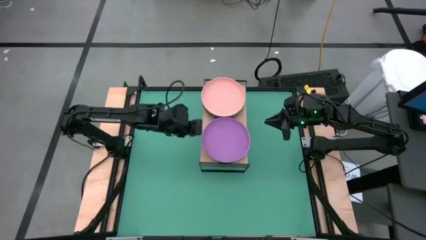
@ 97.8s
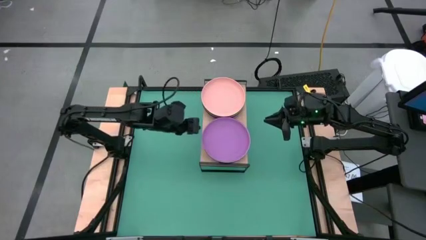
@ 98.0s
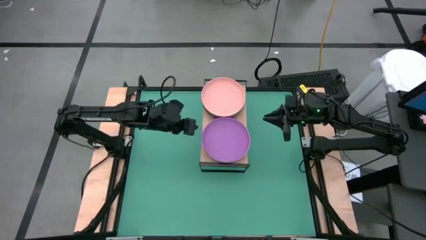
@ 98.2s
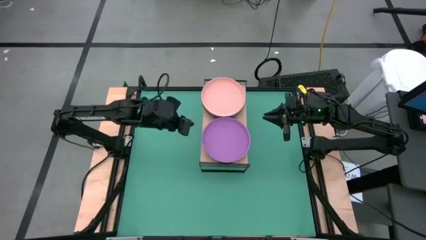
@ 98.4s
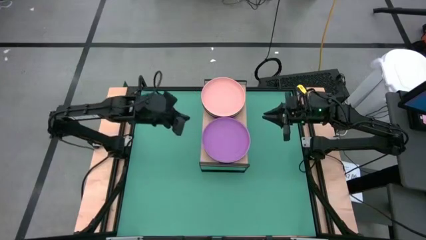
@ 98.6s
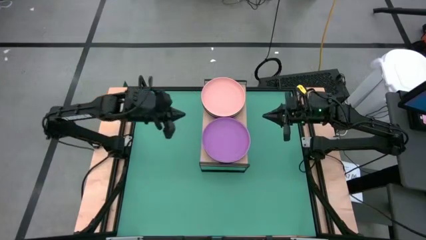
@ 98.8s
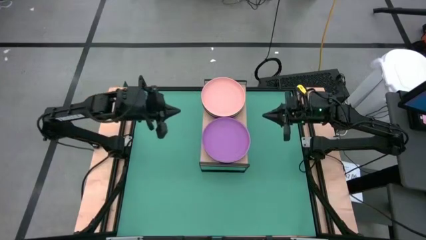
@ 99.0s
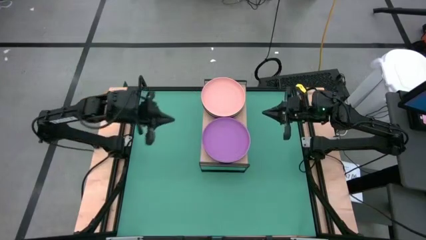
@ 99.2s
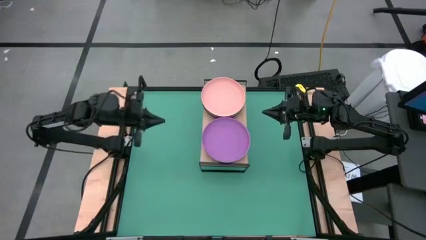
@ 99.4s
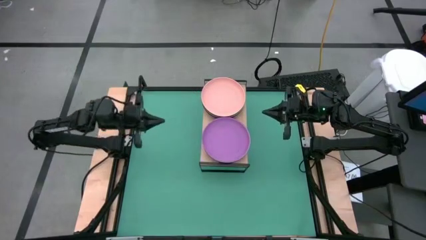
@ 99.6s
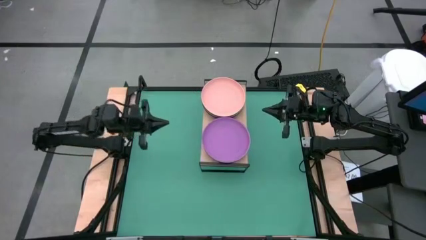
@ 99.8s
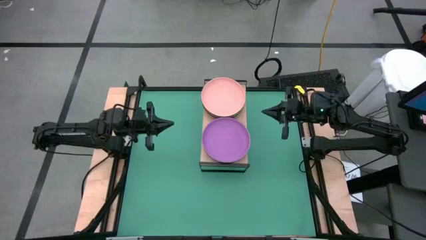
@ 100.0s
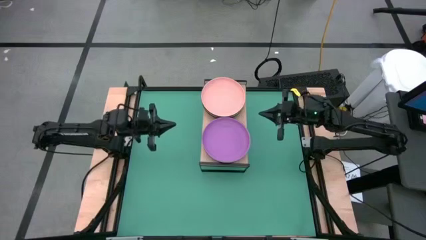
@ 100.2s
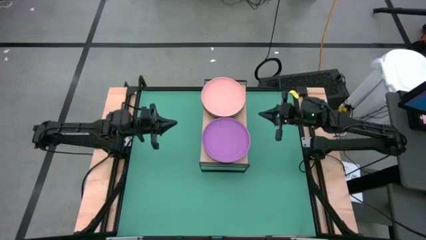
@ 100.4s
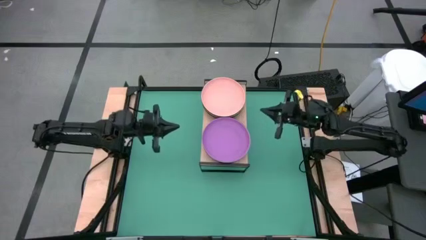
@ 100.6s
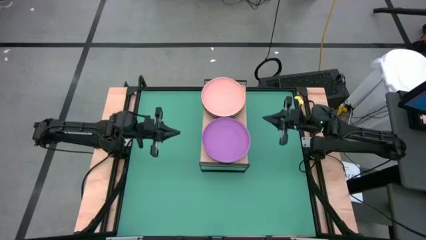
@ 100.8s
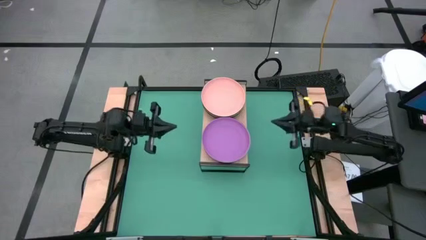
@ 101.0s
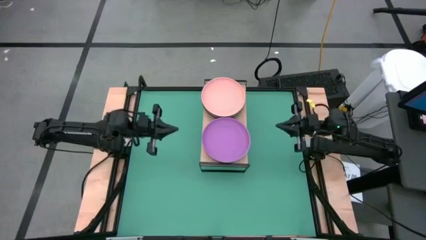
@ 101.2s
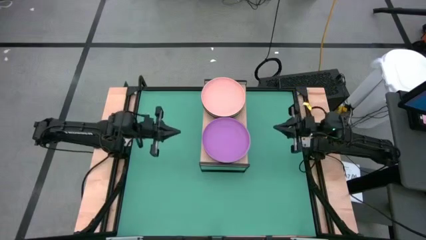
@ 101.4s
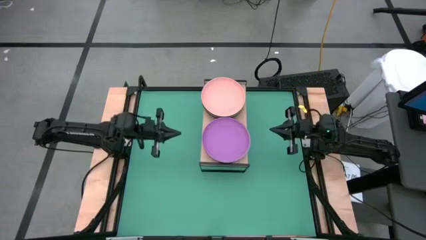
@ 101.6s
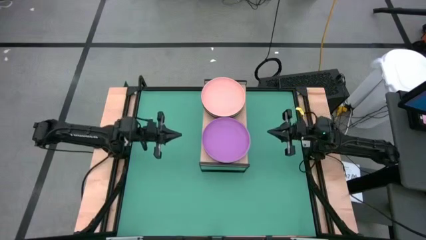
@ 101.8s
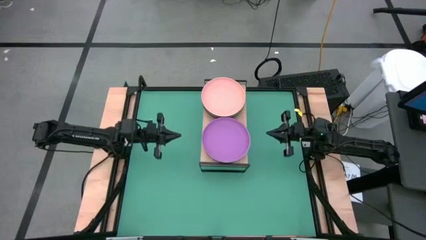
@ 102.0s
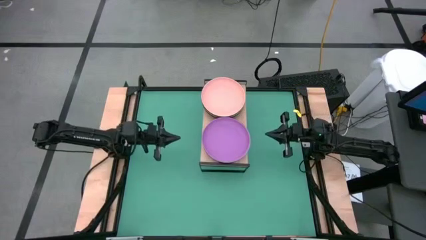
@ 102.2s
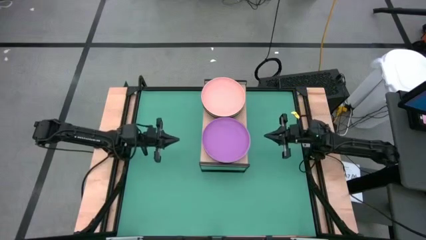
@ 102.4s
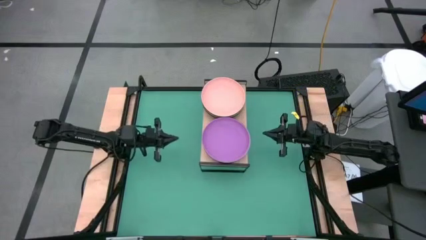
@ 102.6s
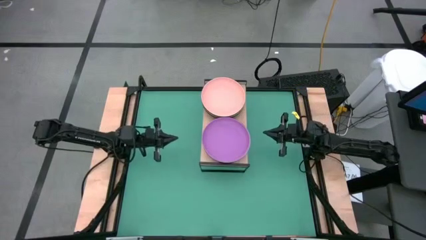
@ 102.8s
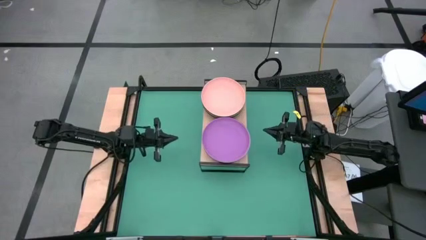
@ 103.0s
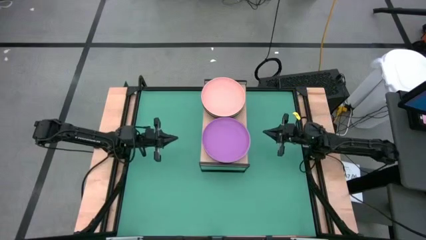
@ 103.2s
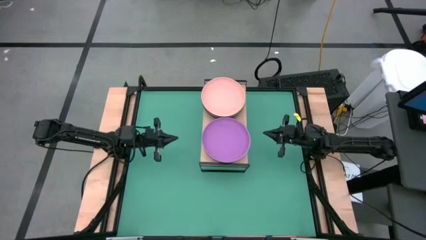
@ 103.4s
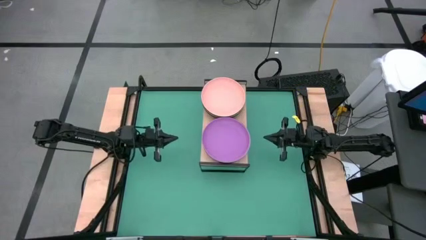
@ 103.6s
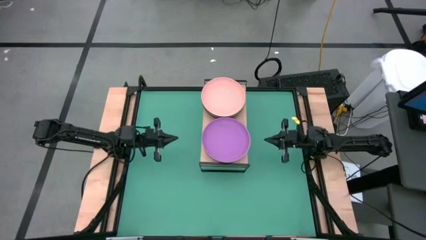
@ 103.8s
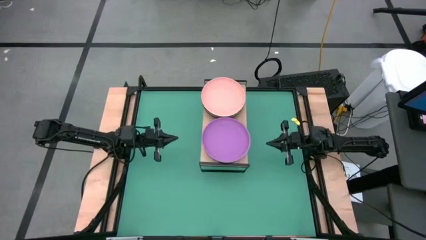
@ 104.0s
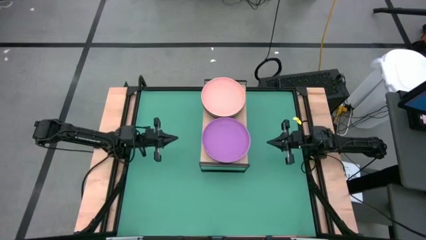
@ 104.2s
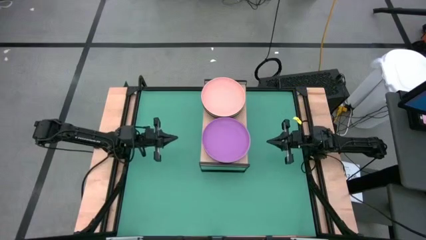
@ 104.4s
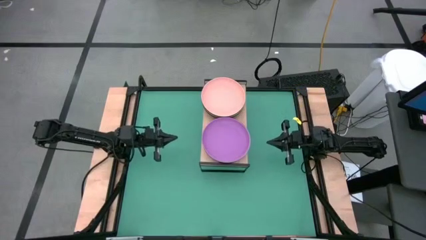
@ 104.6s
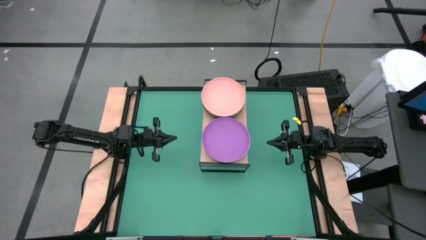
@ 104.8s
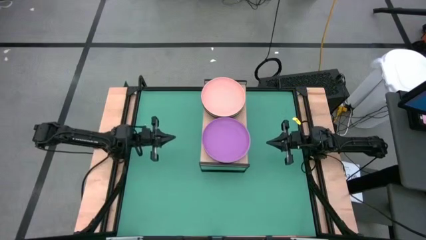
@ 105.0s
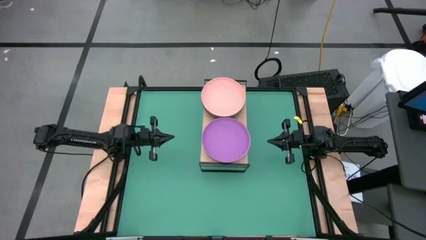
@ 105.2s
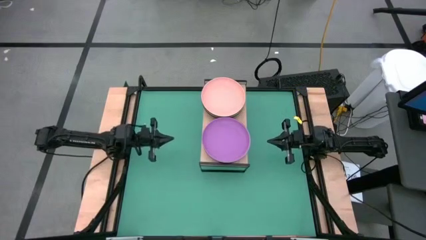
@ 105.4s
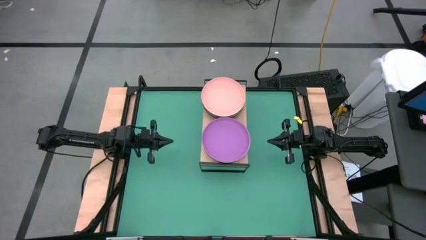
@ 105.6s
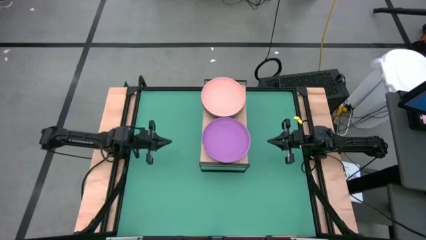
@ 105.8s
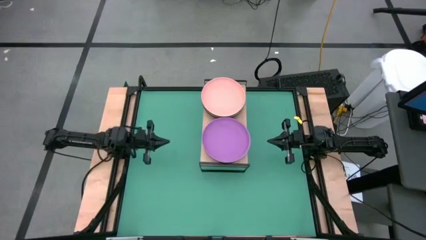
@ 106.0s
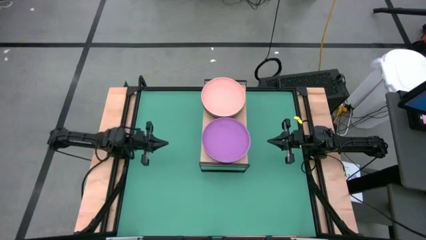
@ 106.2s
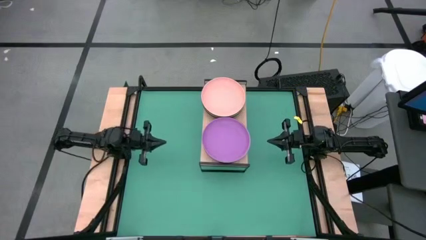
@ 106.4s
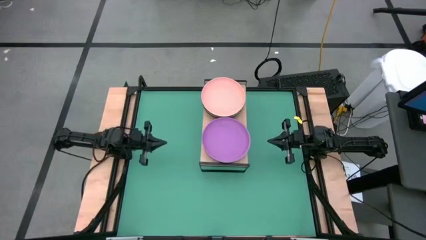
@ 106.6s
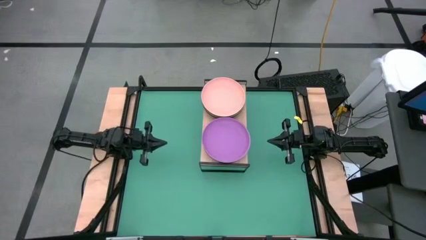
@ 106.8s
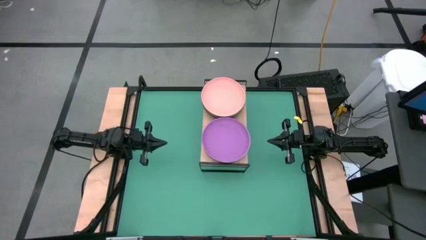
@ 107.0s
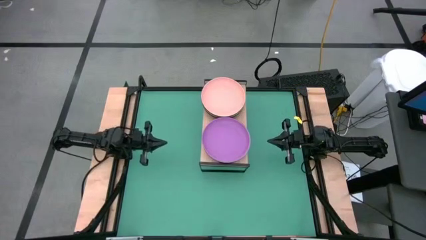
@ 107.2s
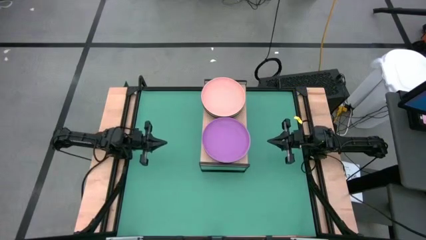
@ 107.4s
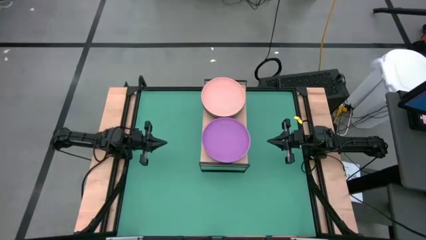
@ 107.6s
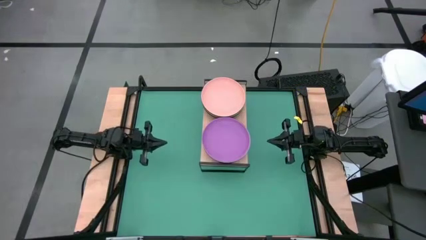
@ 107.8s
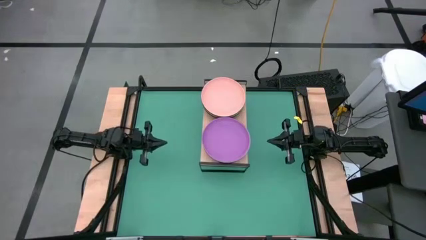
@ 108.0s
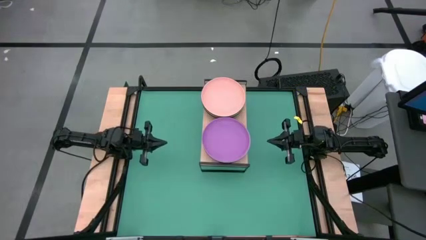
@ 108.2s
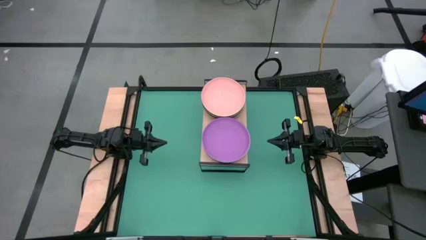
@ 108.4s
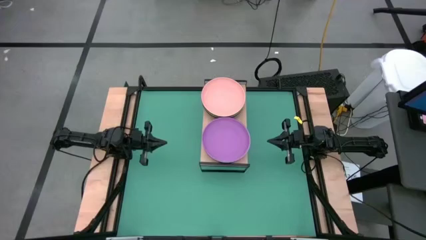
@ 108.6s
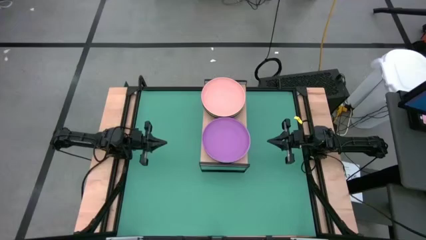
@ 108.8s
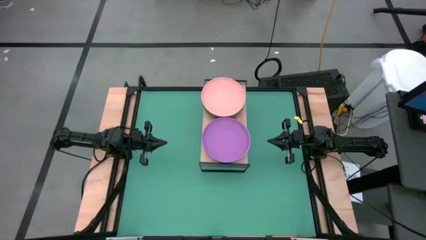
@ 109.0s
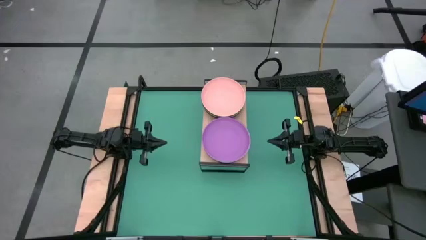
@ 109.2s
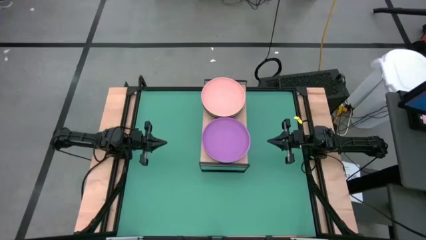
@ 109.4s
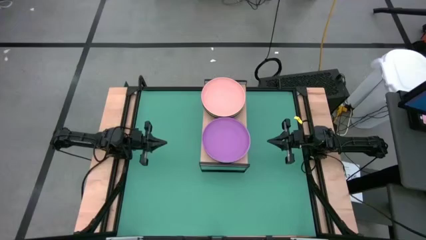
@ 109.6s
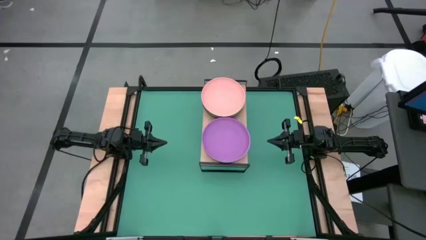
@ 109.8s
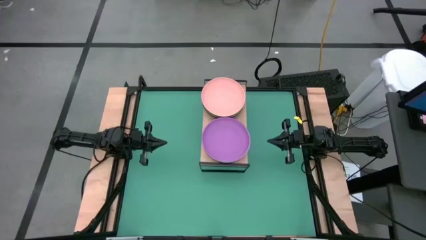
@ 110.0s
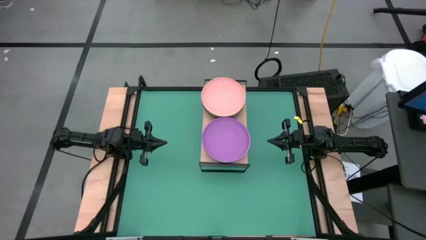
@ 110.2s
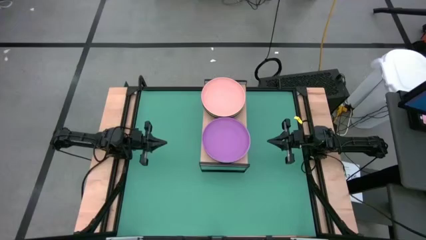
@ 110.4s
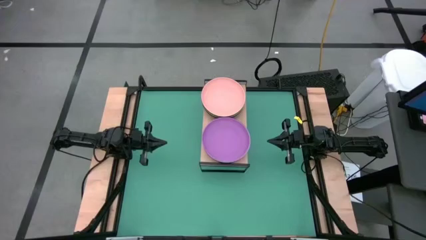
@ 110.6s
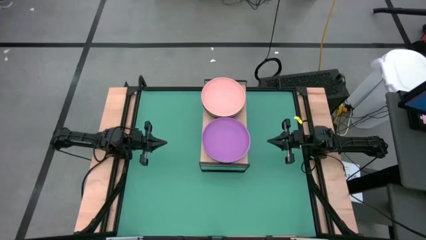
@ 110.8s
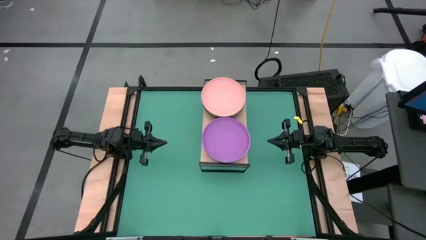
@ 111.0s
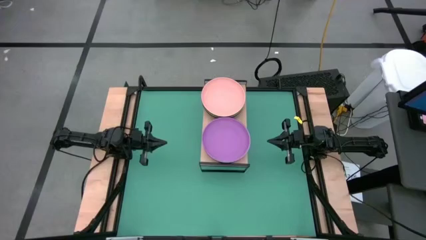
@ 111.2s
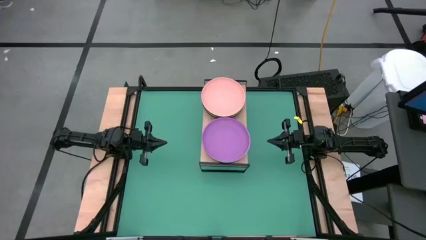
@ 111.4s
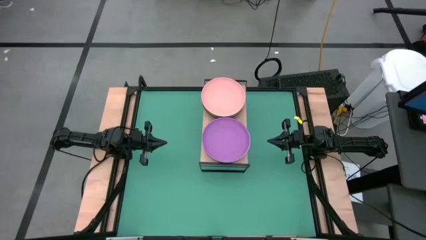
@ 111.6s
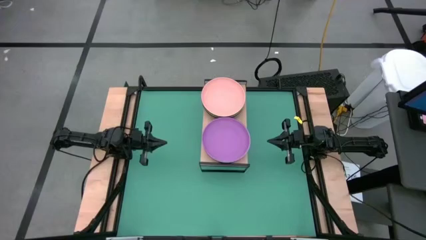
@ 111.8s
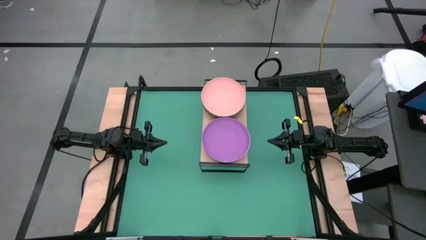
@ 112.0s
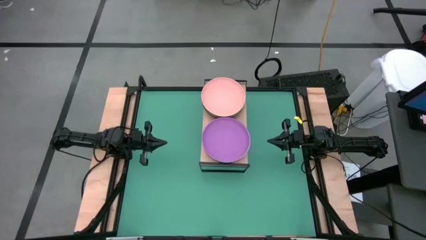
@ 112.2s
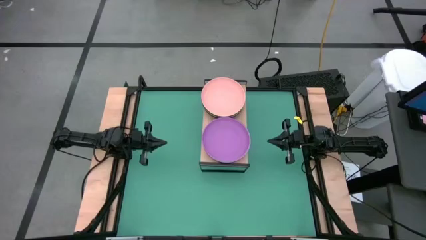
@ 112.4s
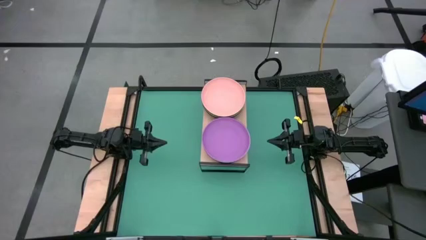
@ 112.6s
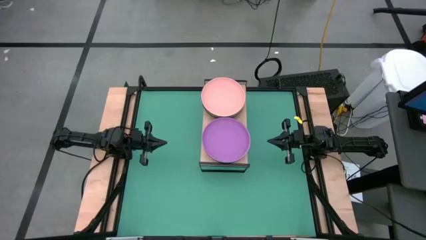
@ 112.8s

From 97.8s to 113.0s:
Task: Place and stack plates onto a shelf
Return to Home Position

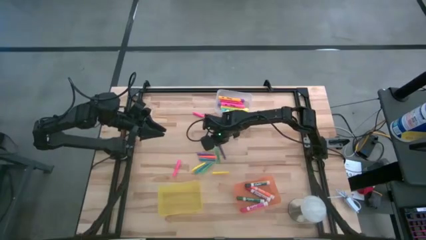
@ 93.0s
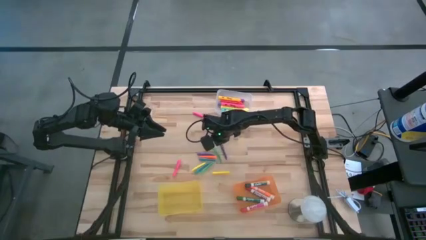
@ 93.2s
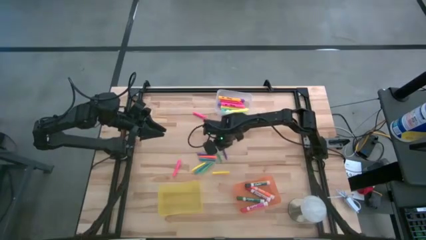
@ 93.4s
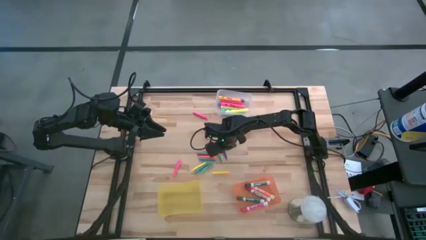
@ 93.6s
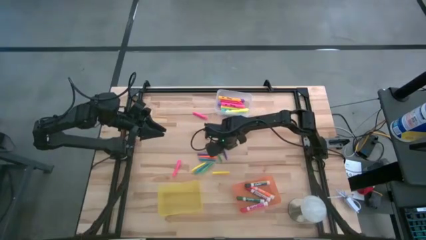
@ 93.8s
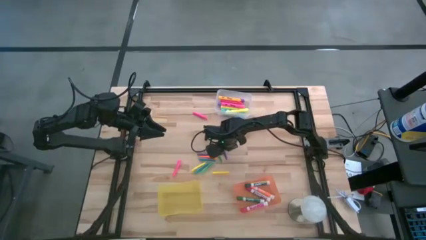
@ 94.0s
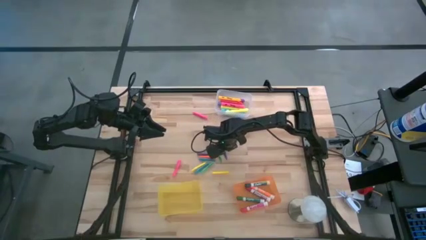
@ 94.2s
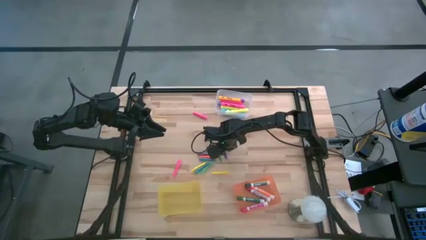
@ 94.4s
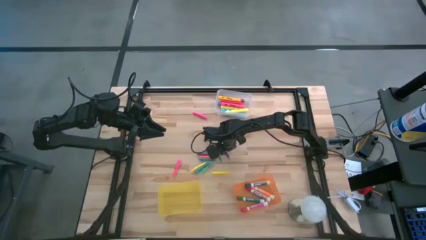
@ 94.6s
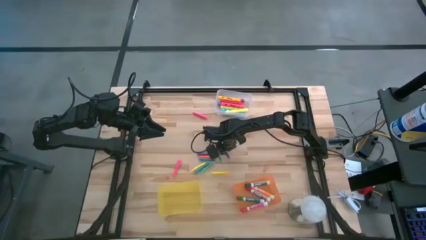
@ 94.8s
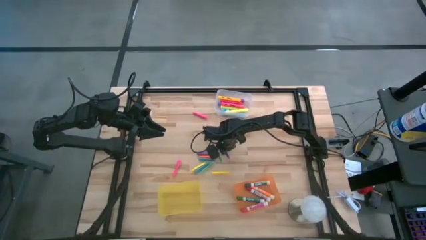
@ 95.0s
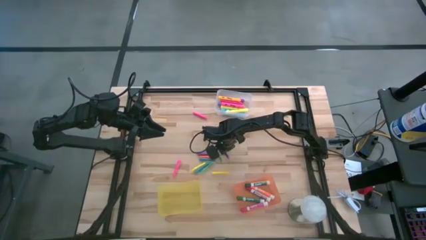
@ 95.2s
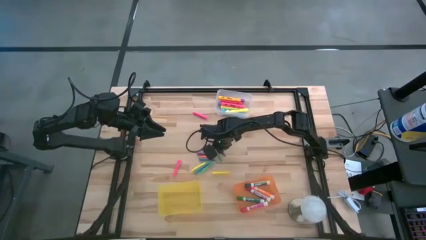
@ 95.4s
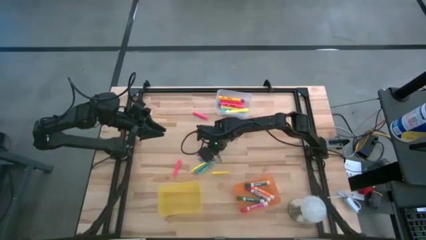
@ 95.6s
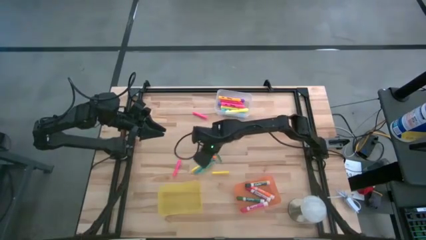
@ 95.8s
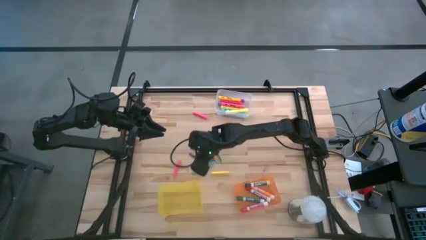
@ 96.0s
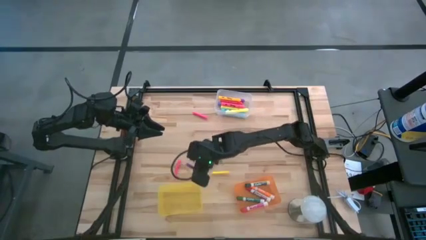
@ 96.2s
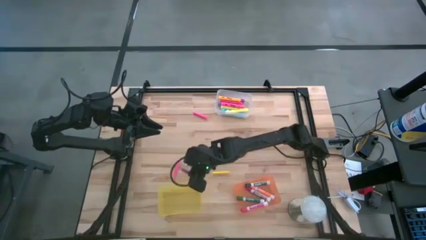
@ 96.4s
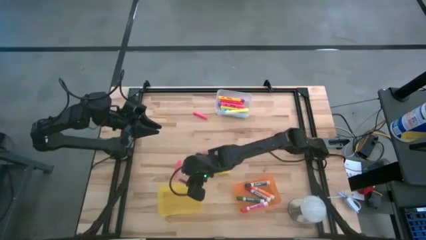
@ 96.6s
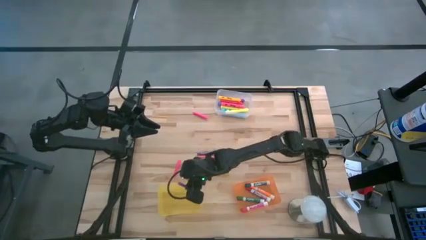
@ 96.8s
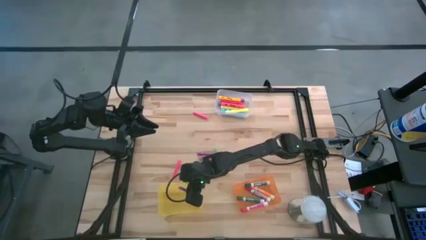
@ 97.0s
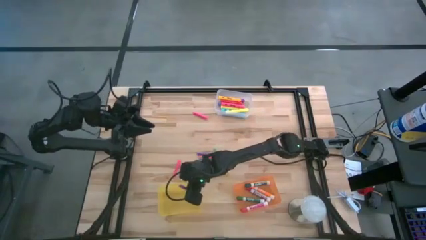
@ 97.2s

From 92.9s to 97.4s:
Task: Pick & Place Markers
Put the right purple pen into the yellow bin
